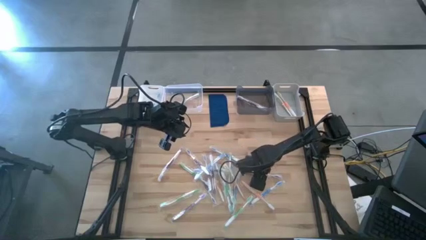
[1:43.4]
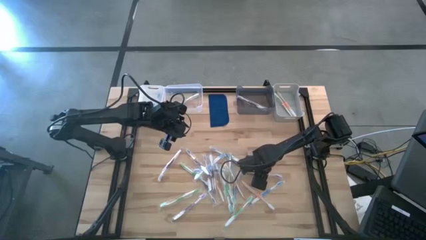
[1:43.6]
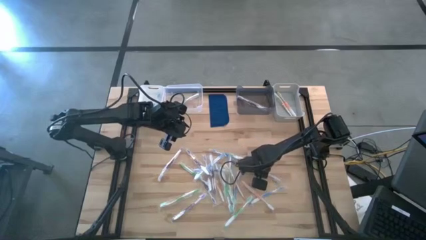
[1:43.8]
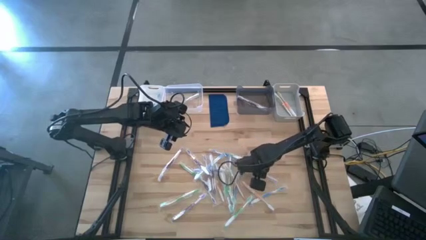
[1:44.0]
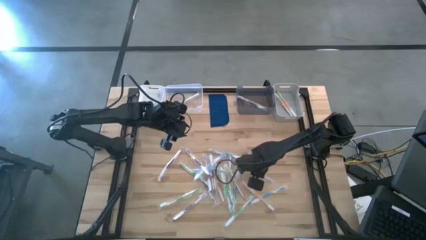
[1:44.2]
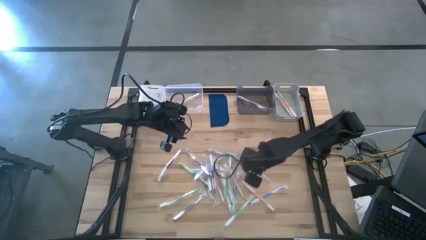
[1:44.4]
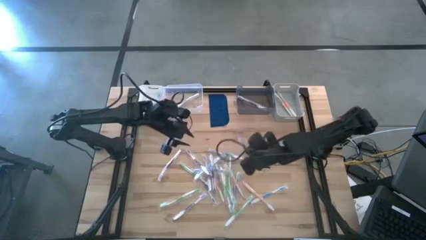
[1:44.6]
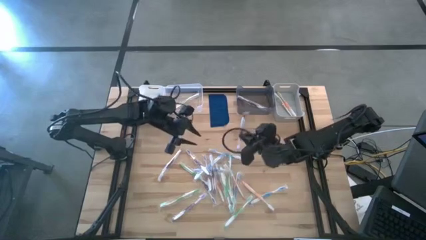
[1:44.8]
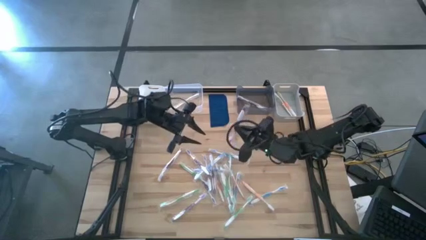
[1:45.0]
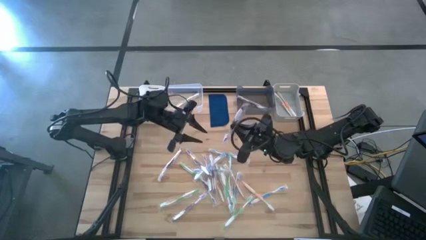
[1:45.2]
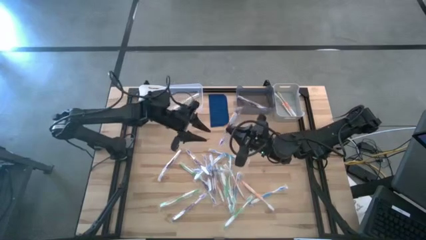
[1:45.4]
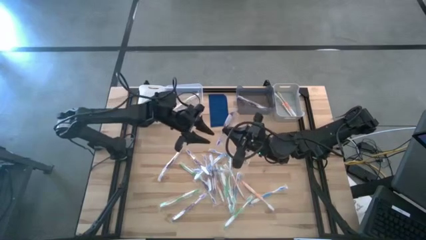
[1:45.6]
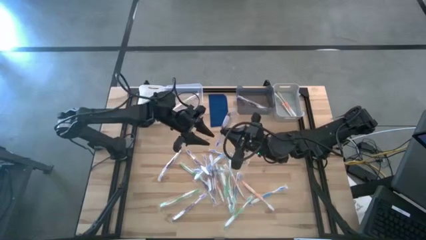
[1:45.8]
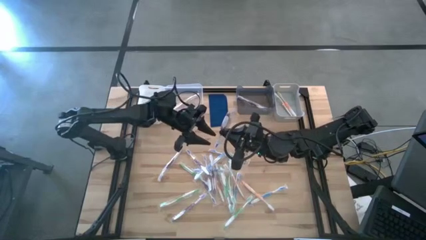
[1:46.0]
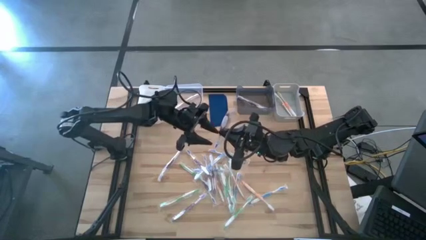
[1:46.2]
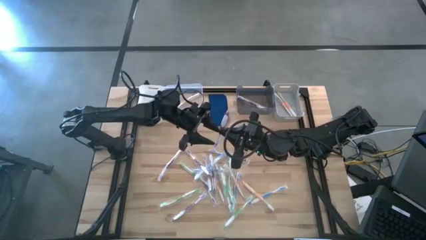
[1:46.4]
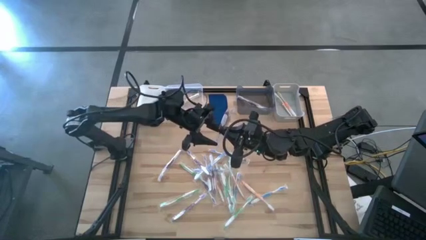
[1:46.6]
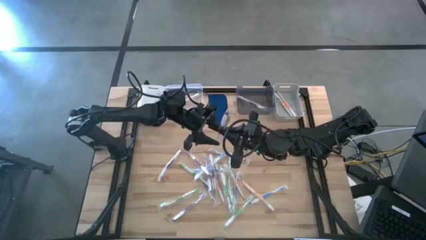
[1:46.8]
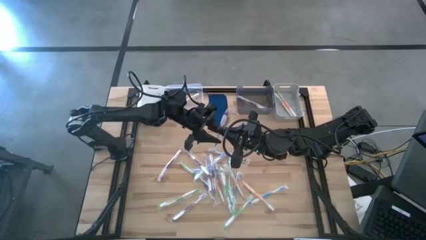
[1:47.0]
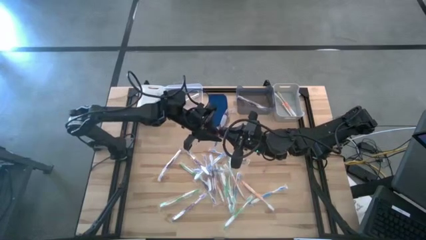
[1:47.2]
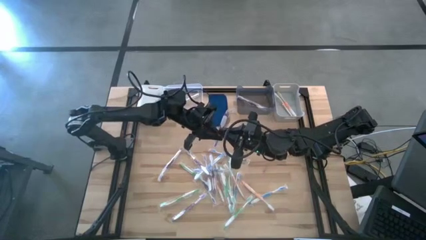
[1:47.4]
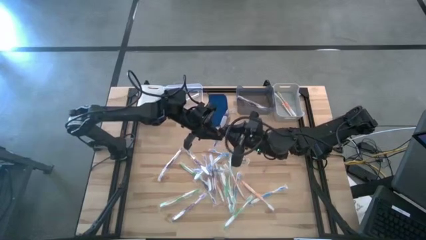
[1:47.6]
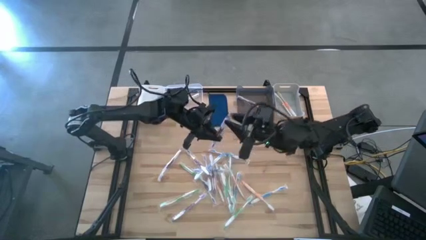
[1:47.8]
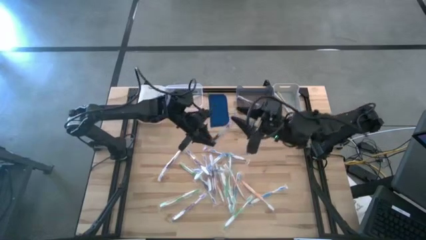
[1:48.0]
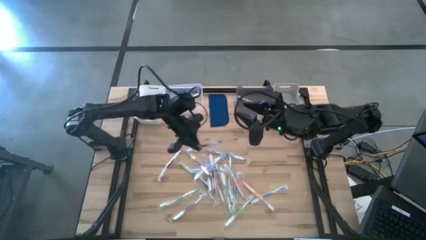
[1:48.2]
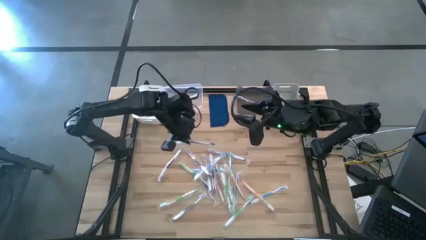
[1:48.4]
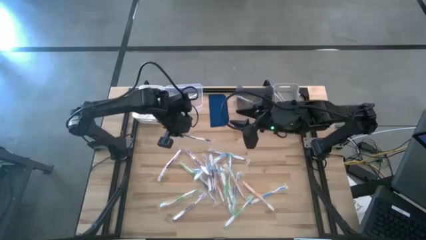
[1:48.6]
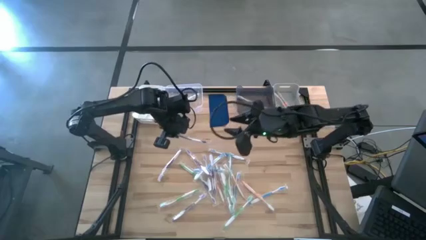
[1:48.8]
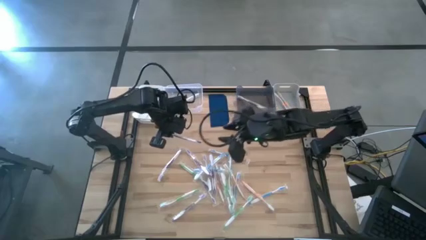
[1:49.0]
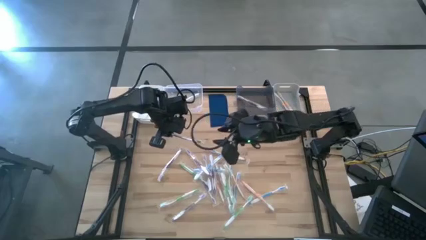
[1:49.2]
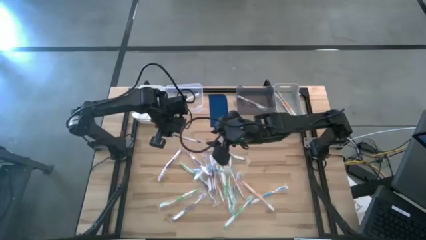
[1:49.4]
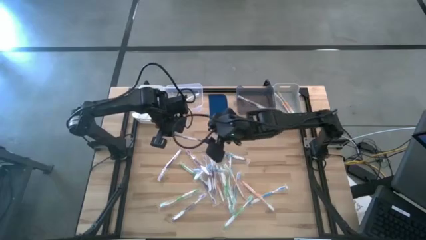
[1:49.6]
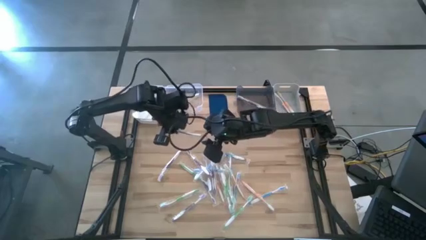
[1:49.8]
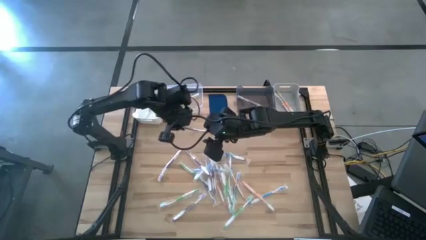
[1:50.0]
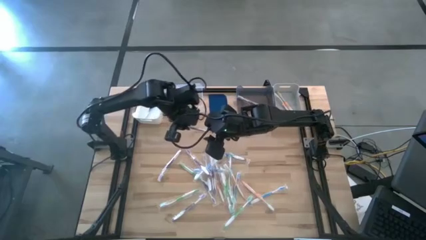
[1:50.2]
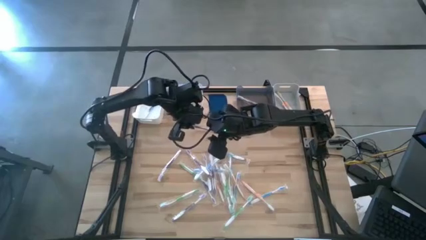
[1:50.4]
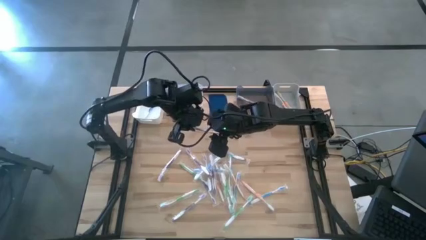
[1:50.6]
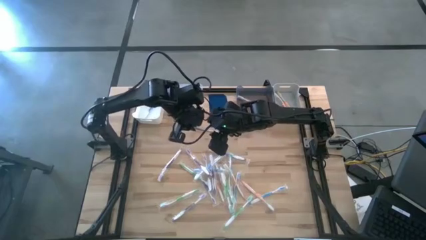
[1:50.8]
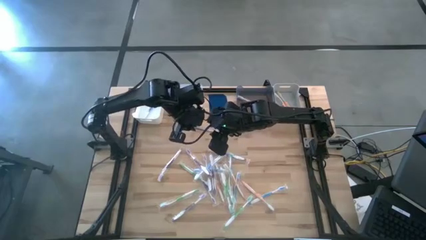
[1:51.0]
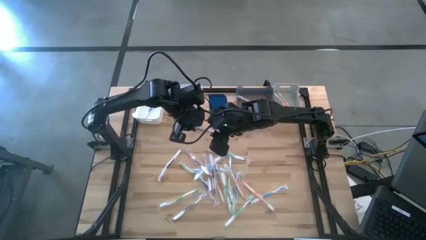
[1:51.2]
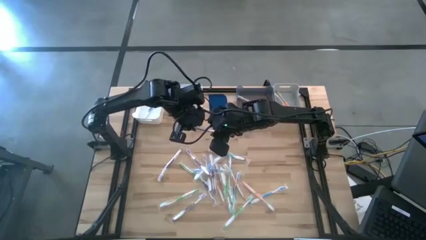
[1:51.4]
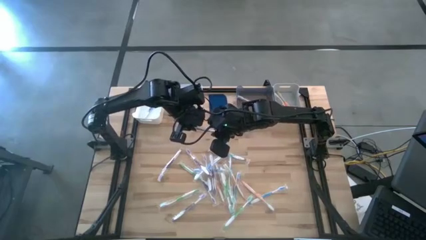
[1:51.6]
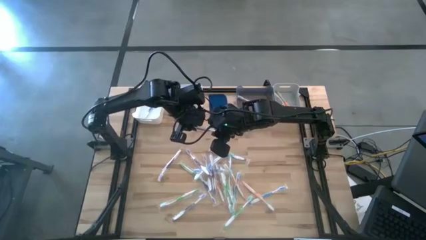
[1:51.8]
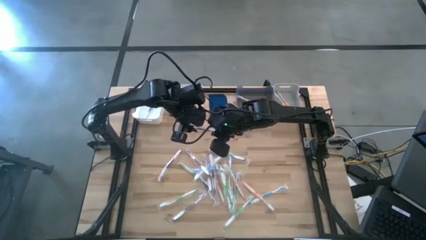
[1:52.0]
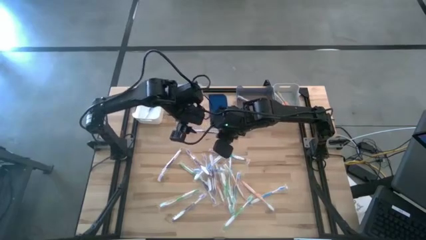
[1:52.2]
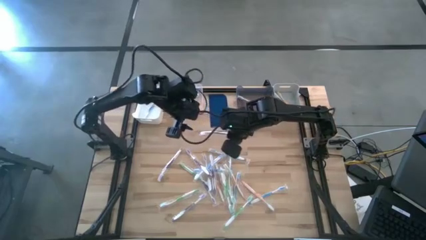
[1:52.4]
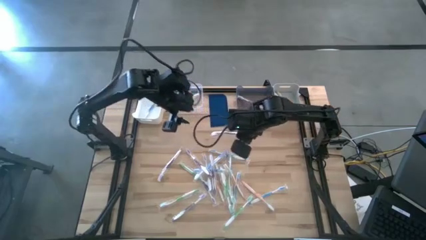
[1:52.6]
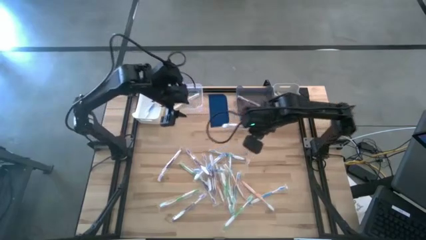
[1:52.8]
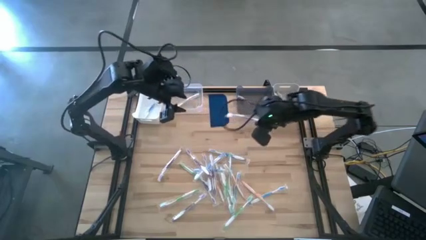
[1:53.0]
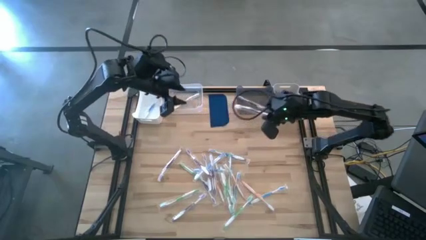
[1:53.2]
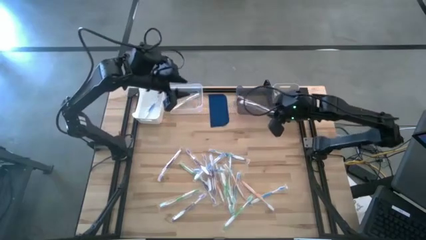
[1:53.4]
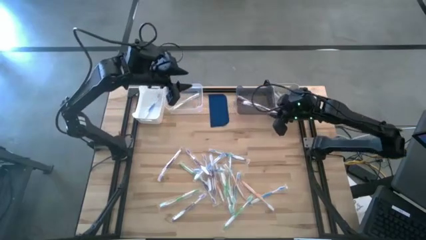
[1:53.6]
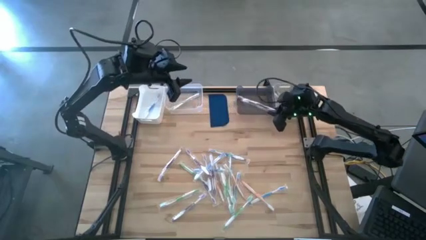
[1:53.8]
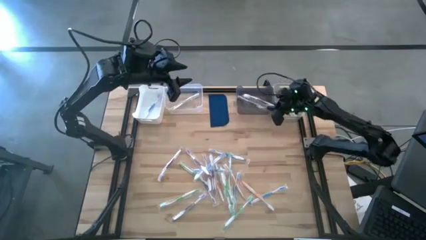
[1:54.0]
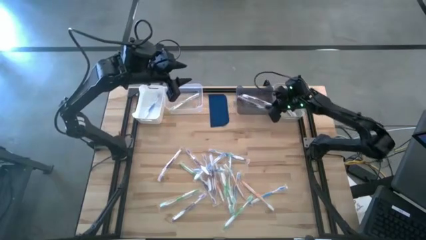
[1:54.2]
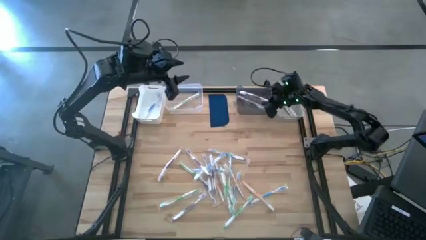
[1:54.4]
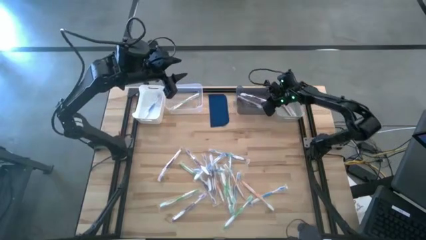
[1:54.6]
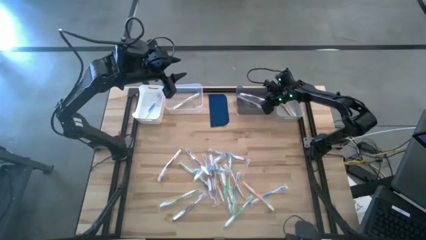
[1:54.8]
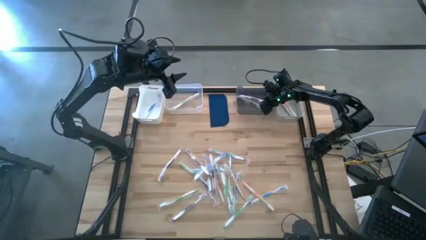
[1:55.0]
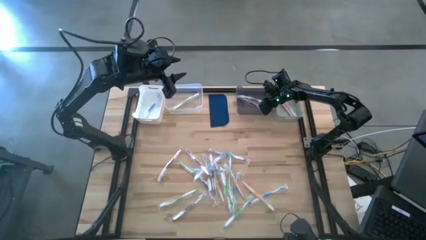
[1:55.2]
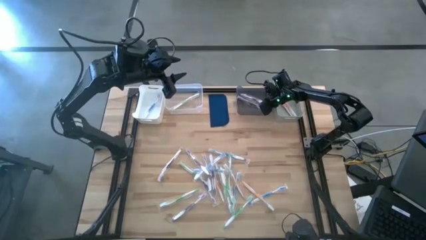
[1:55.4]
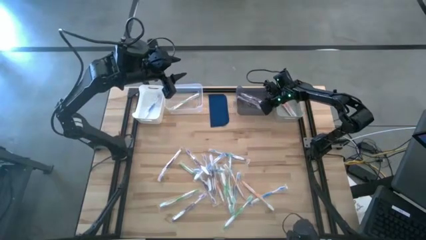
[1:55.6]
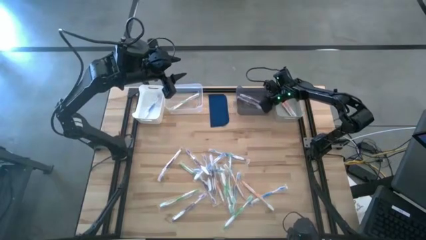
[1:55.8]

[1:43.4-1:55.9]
Task: Pick & Place Toothbrushes
Put the purple toothbrush into the black bin

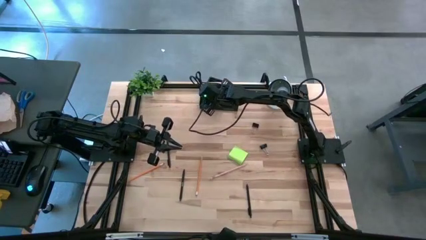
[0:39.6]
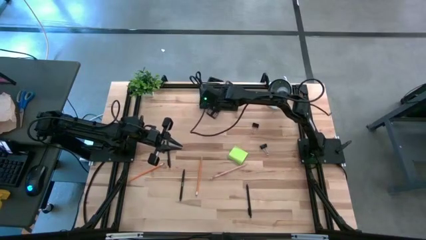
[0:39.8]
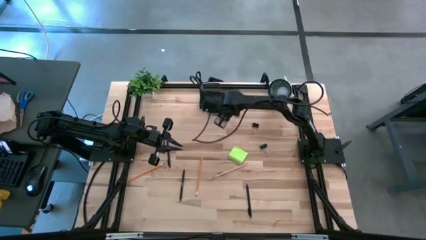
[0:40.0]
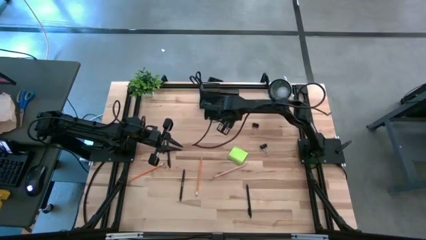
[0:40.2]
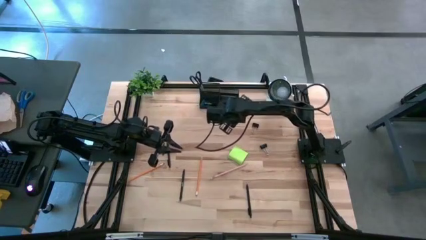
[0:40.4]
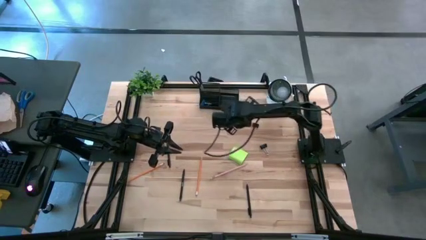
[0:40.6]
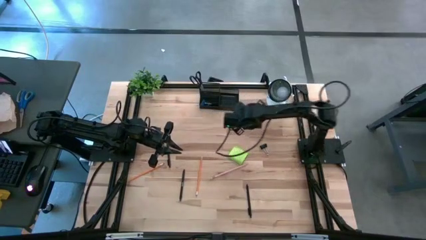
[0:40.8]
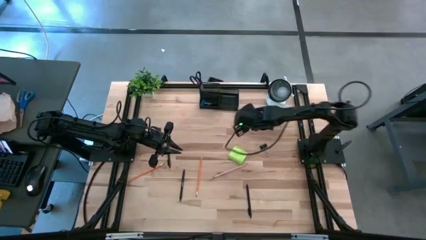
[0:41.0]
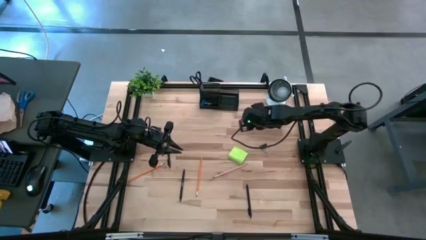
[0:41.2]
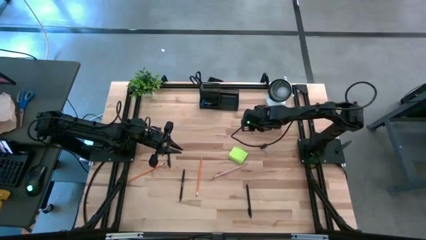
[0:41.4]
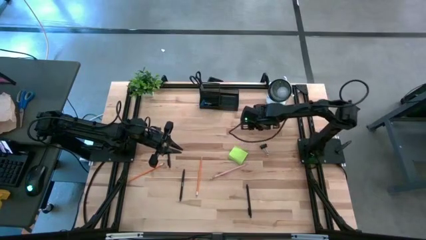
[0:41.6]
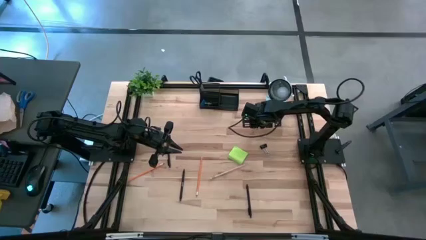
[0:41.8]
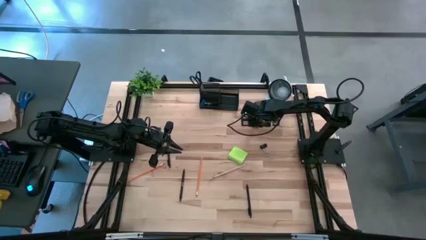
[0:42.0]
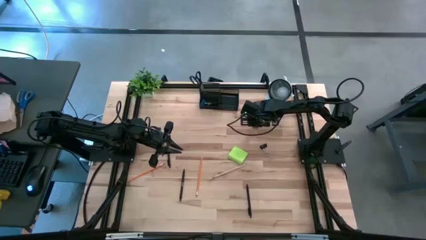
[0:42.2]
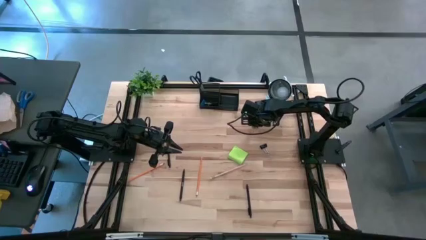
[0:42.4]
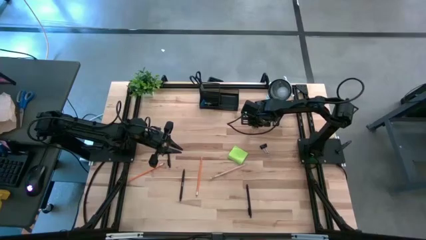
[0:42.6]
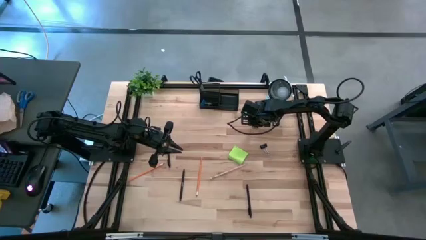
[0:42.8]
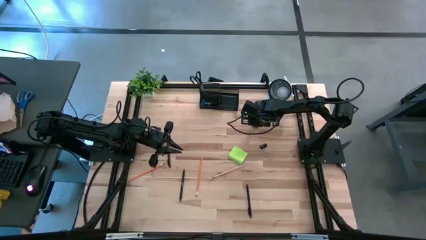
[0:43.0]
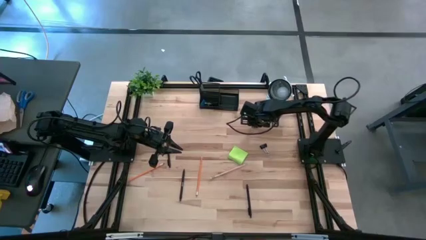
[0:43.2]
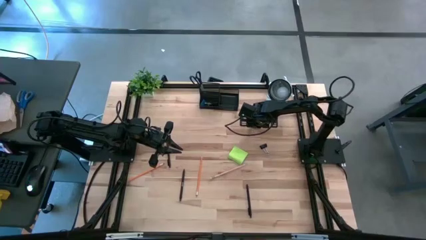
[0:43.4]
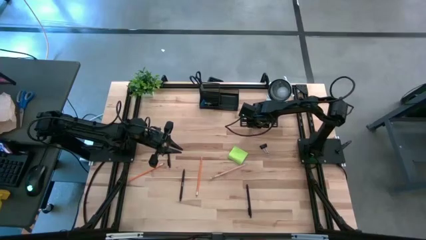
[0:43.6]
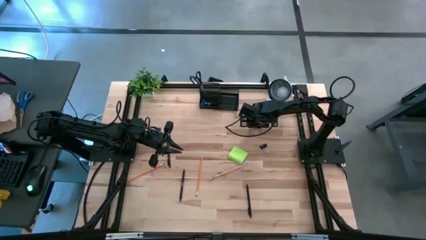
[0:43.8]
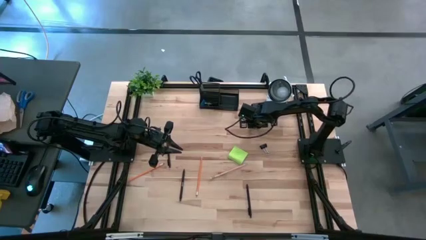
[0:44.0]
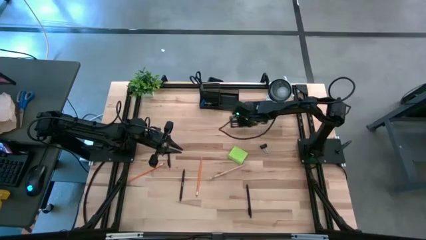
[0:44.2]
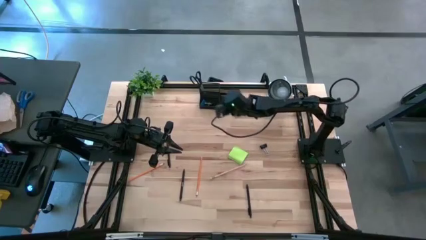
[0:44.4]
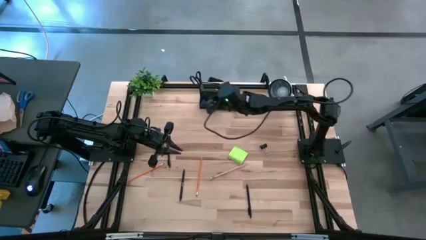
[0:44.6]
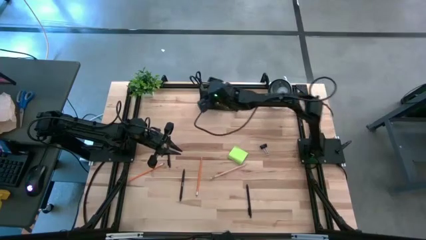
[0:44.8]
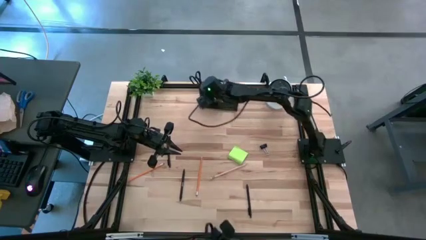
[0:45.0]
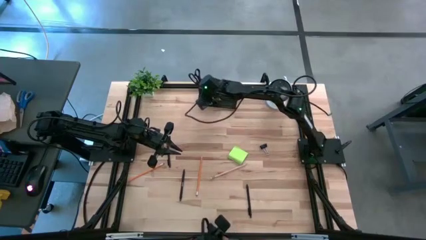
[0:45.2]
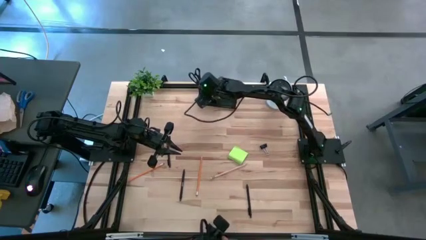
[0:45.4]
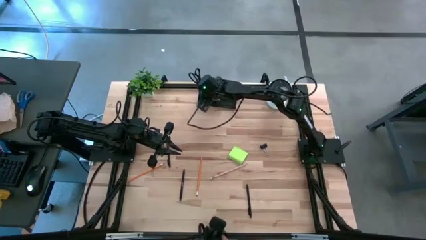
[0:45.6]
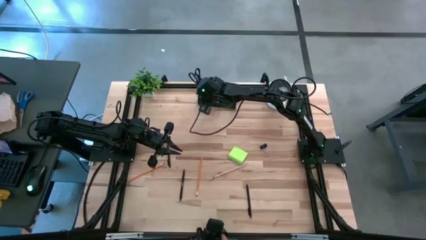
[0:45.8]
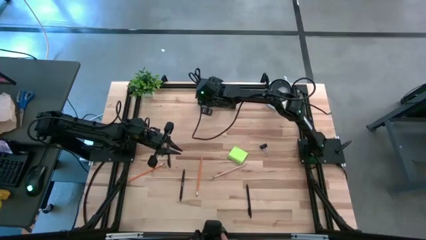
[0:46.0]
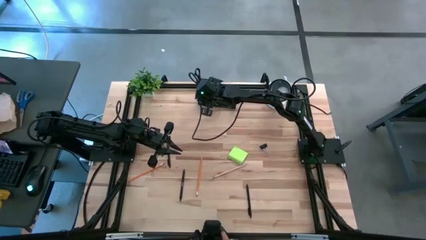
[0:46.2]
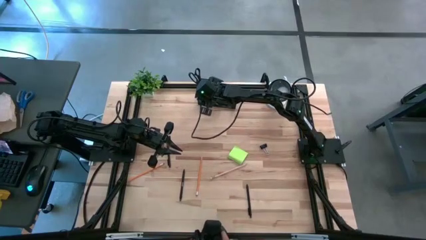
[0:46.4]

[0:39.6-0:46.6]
Task: Pick and place office supplies into organizer
Put the black binder clip into the black desk organizer
